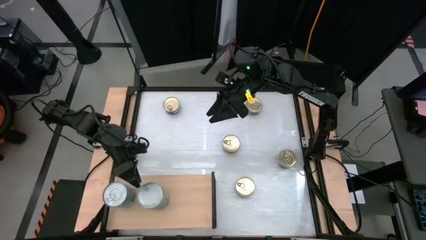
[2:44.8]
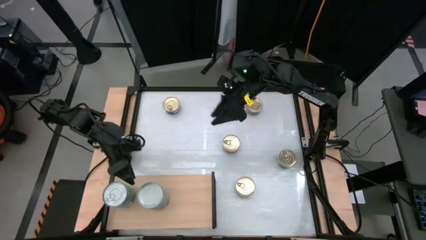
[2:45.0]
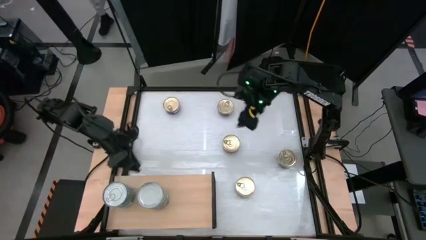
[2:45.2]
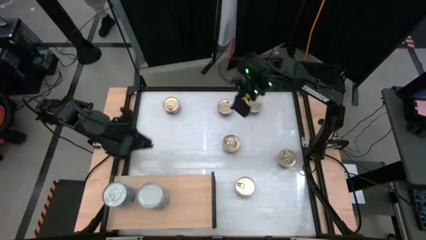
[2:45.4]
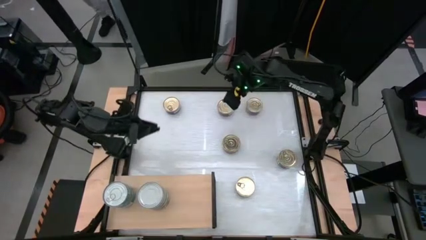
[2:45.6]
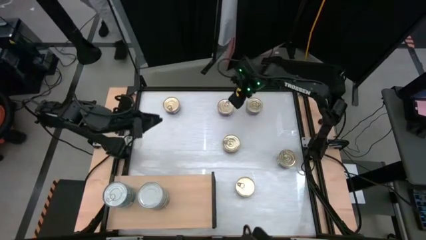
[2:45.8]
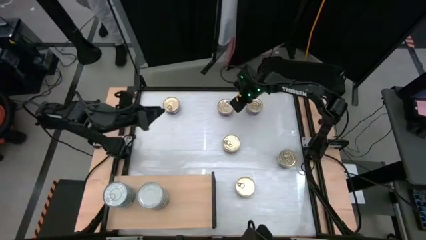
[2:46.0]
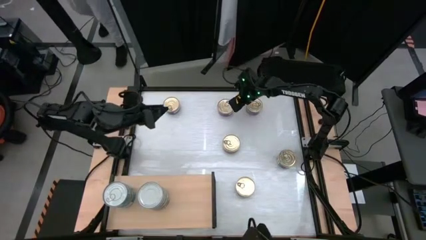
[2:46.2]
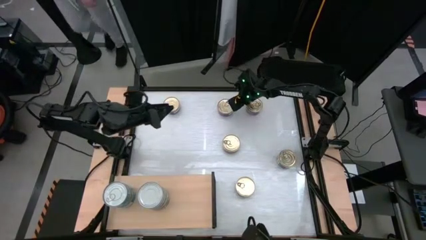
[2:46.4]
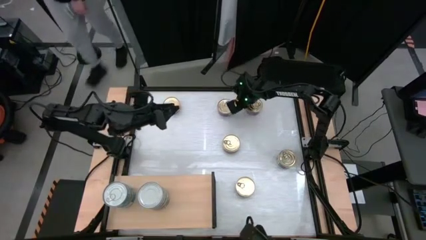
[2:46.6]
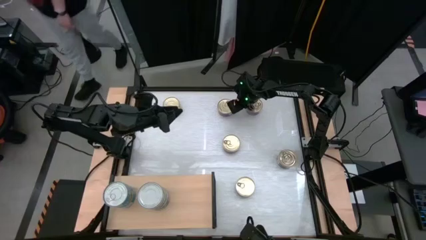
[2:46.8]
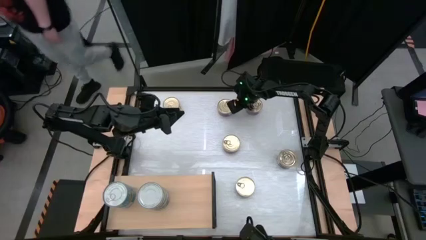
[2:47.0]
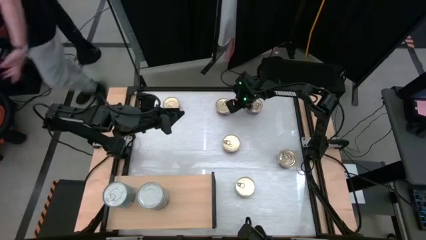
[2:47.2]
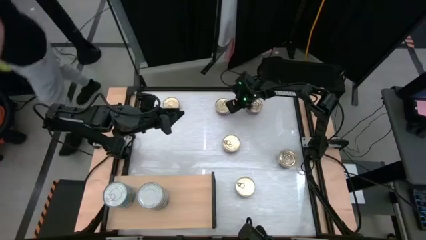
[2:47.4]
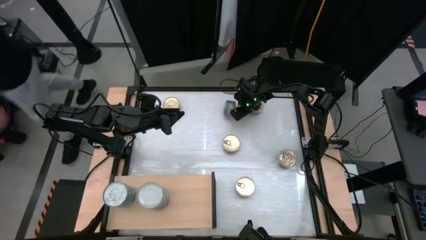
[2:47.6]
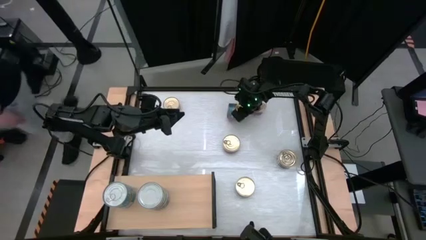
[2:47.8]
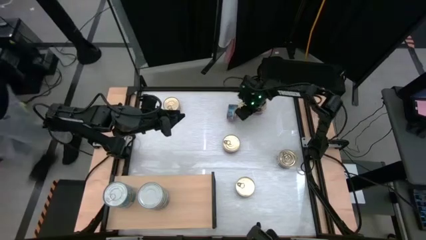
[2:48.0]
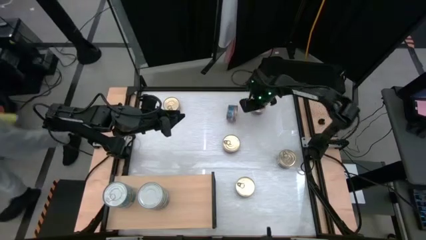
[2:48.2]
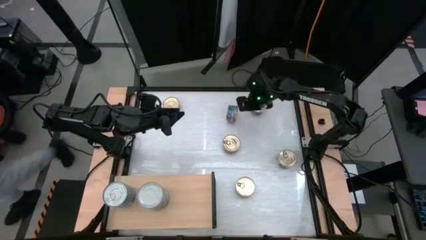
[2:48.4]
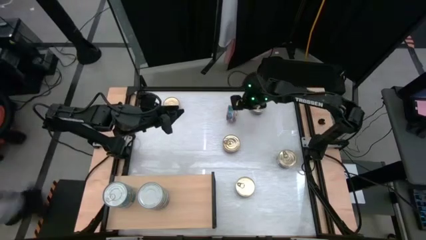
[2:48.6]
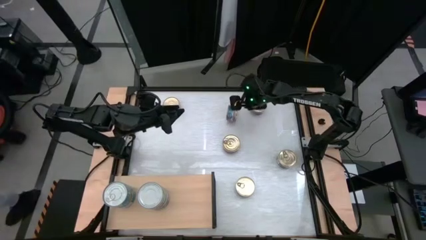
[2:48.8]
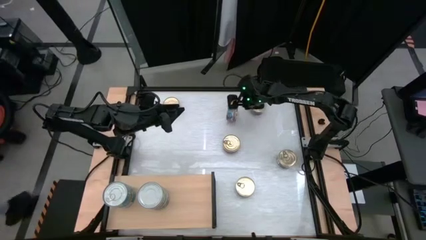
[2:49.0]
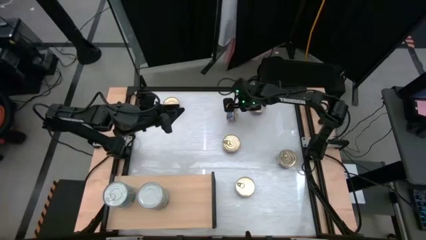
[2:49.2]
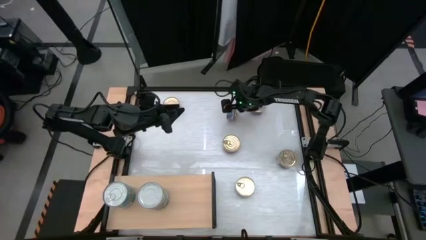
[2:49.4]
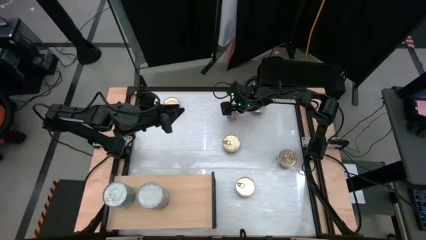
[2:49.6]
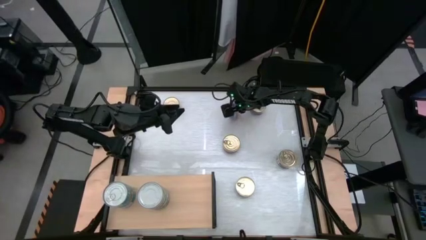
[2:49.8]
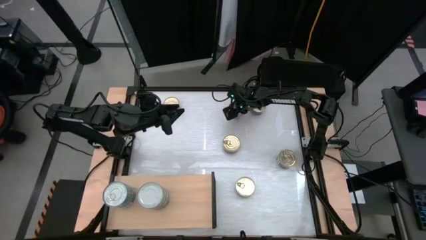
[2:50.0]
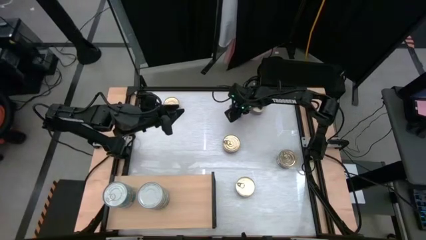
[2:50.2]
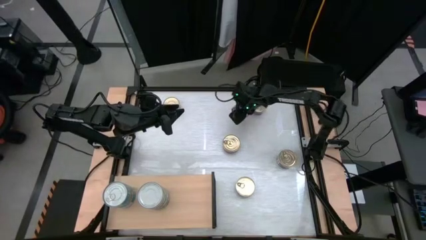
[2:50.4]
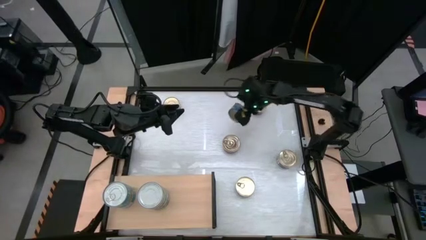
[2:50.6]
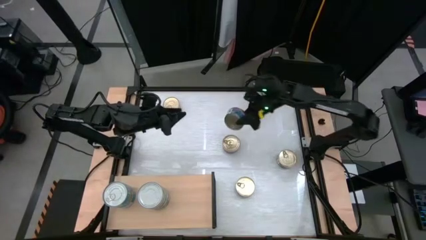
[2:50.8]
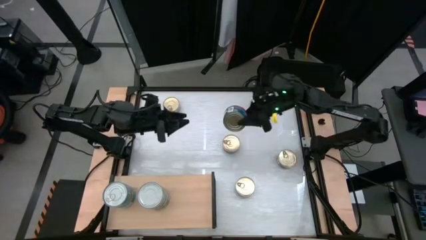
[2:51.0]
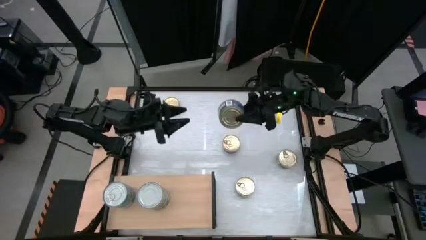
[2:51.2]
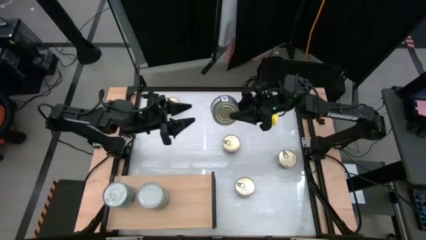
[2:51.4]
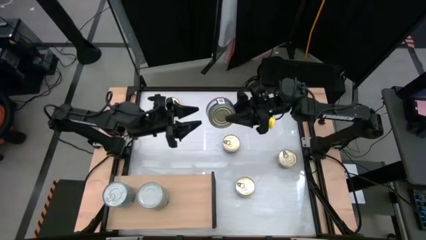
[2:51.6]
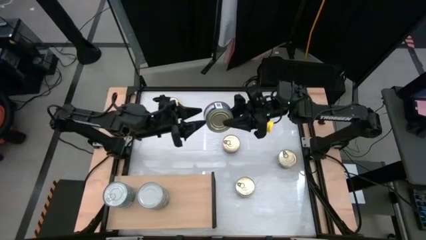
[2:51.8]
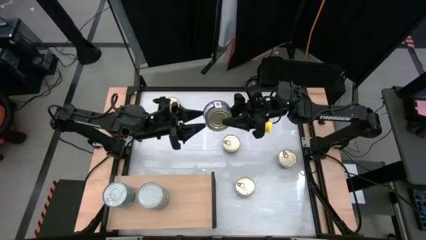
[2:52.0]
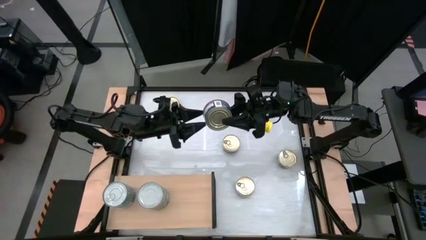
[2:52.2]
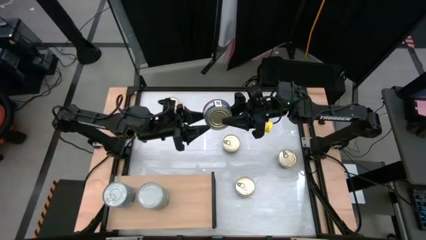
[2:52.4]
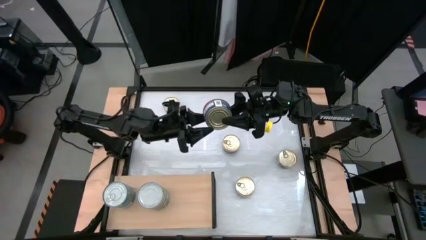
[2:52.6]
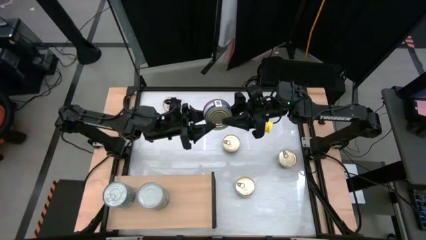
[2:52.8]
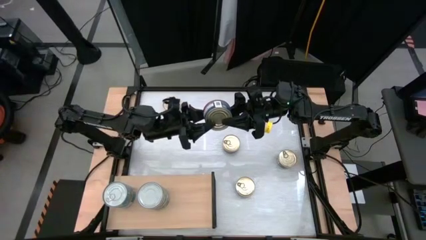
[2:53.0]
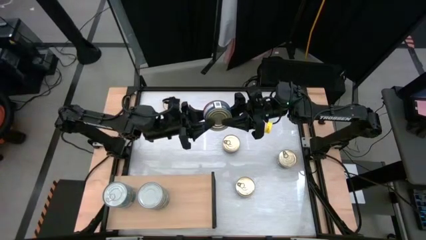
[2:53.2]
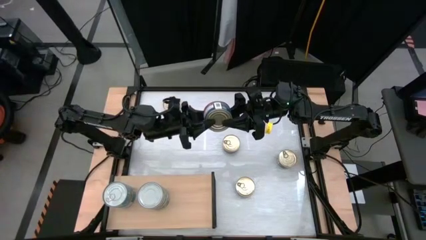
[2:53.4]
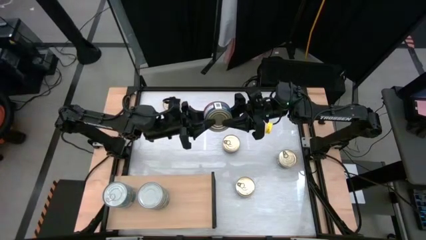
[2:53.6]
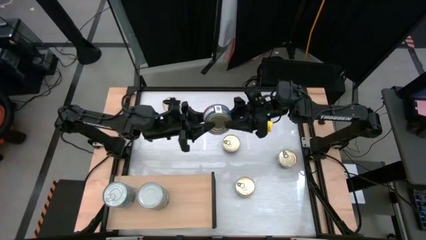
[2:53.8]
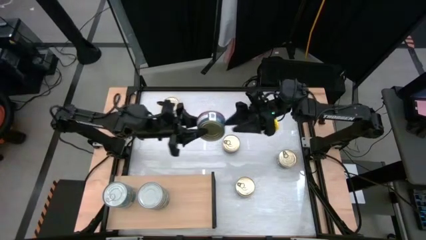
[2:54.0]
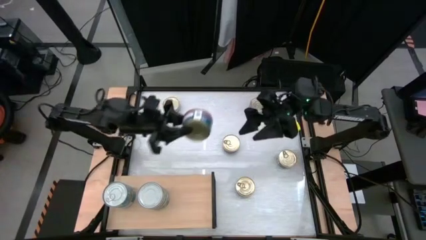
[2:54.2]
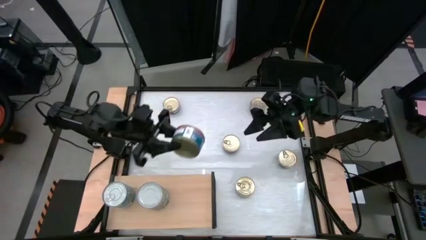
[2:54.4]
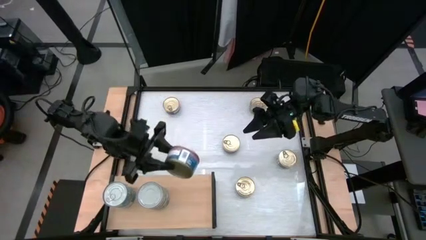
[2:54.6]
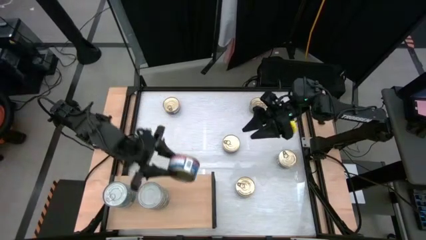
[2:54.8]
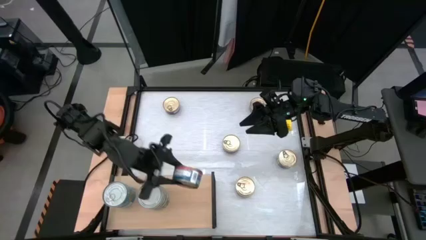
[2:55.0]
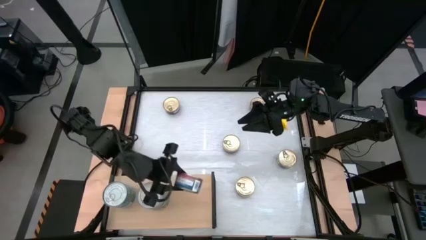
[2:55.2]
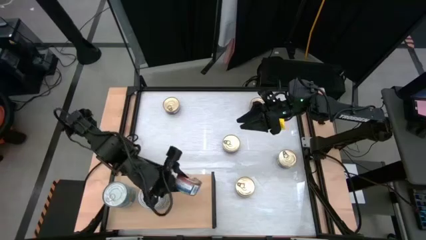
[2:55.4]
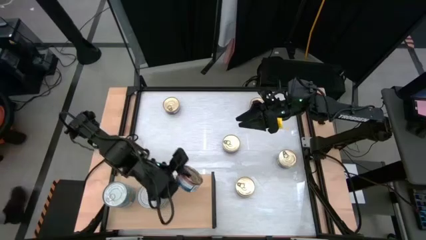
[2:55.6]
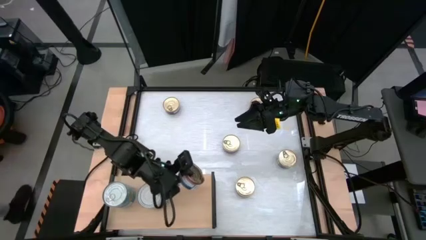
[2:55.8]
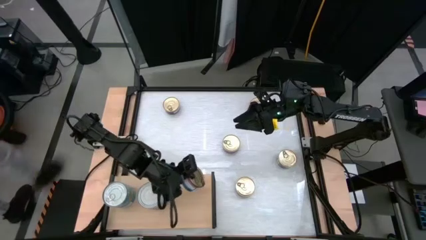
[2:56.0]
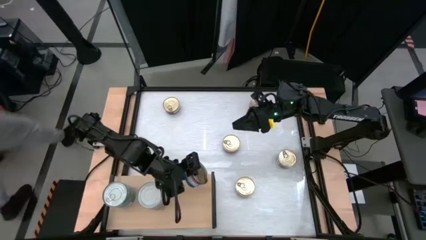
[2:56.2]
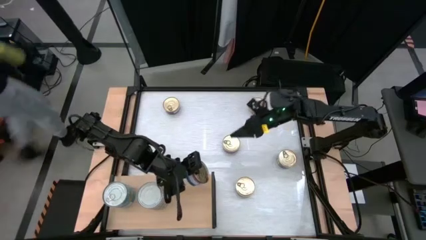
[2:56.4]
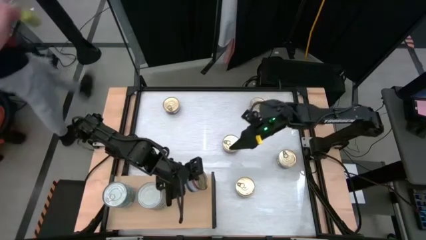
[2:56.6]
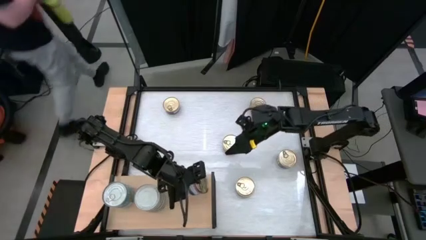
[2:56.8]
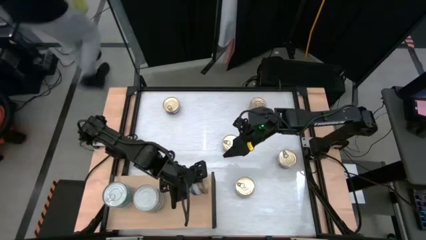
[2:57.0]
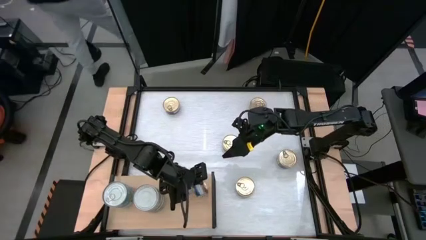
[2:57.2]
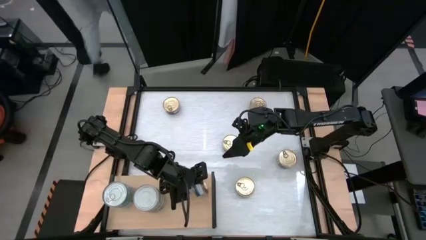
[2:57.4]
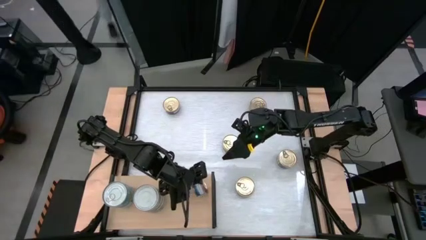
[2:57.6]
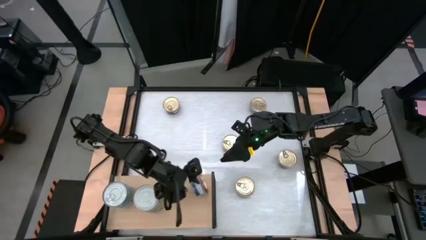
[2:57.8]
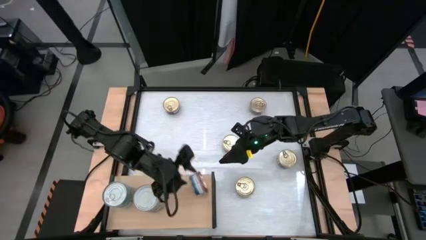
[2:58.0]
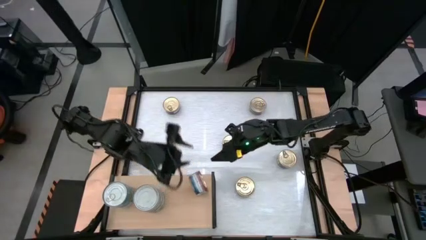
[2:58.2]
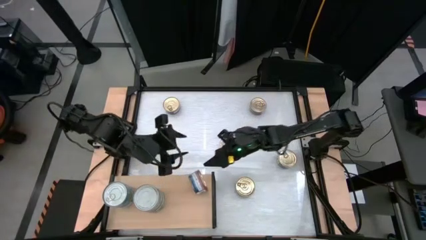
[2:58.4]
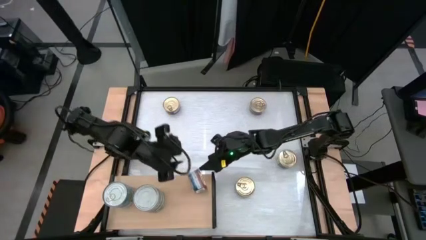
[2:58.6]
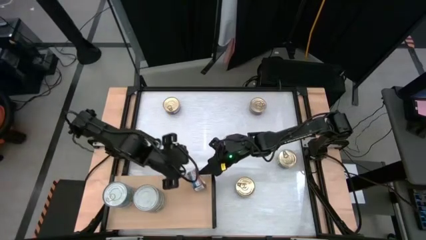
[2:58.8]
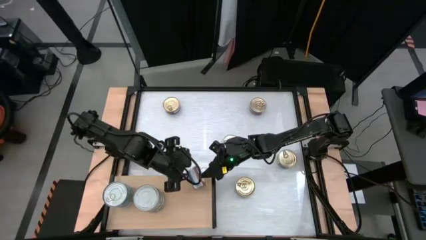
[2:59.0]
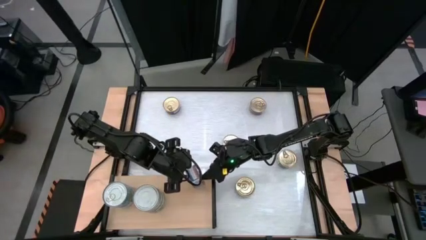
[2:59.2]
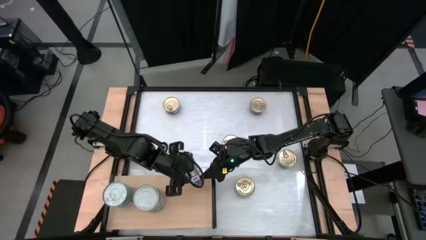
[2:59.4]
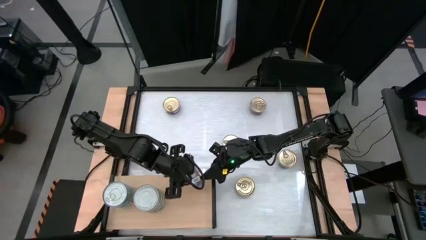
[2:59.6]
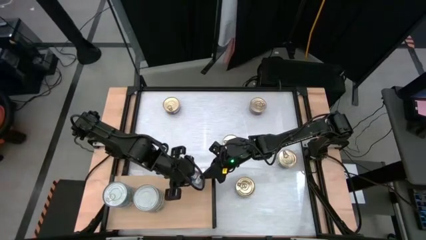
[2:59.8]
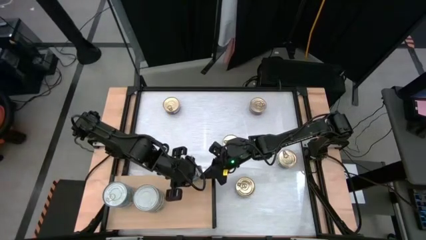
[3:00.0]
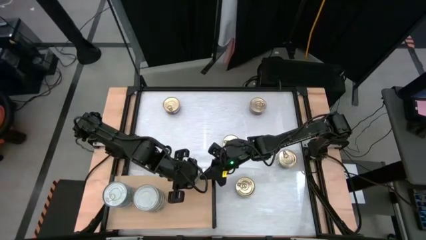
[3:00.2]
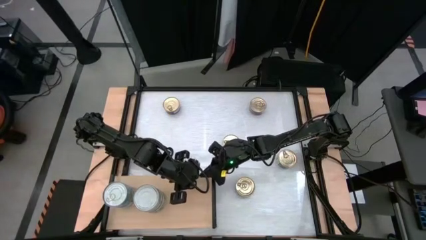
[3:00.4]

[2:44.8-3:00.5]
Task: Stack canned seafood by type on shelf
Put the blue pink tuna can on the shelf
